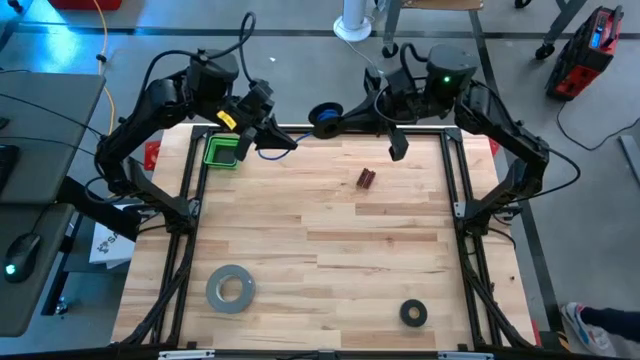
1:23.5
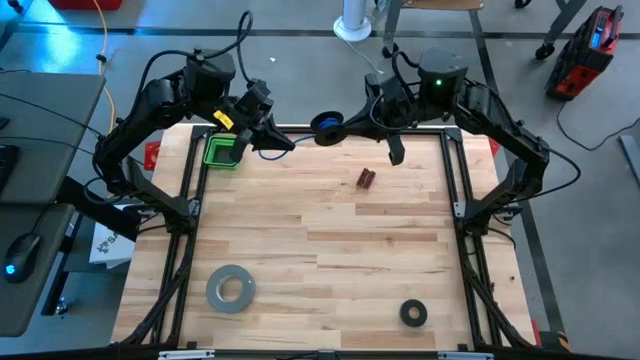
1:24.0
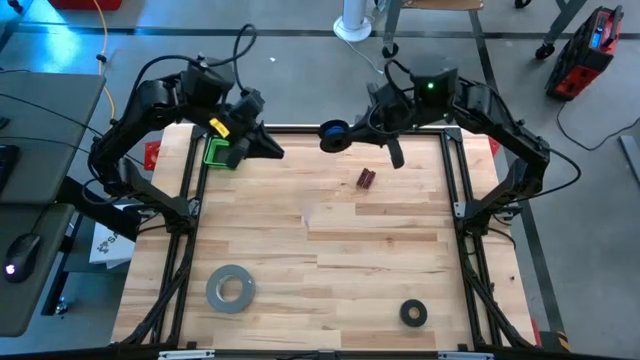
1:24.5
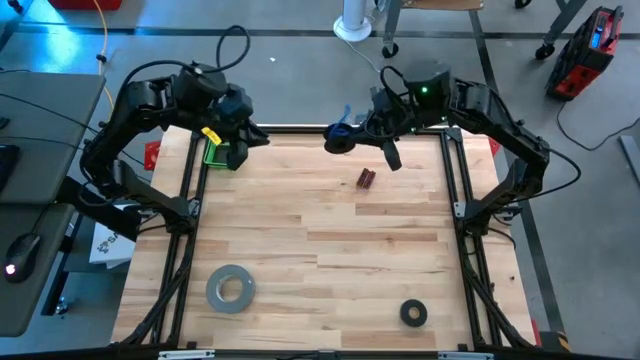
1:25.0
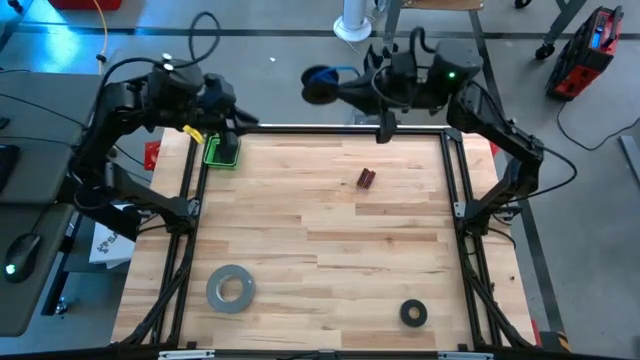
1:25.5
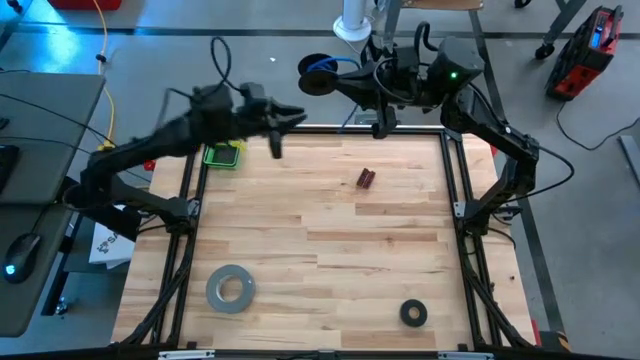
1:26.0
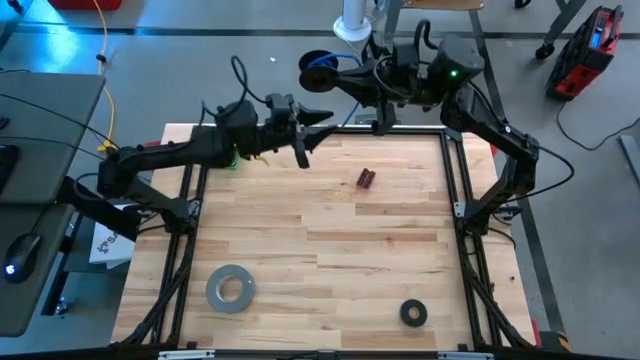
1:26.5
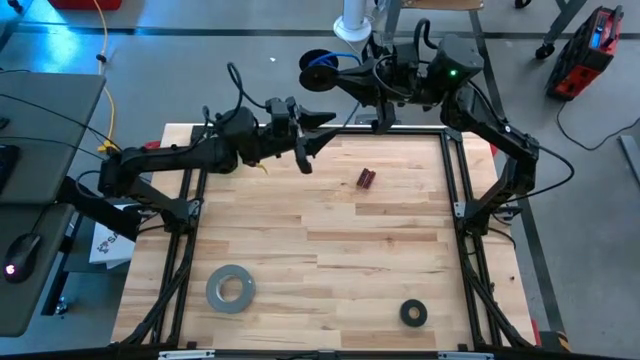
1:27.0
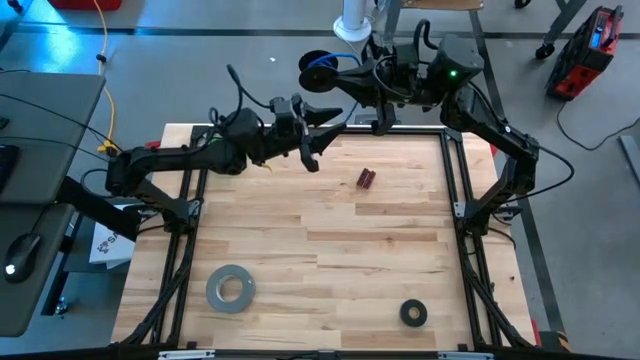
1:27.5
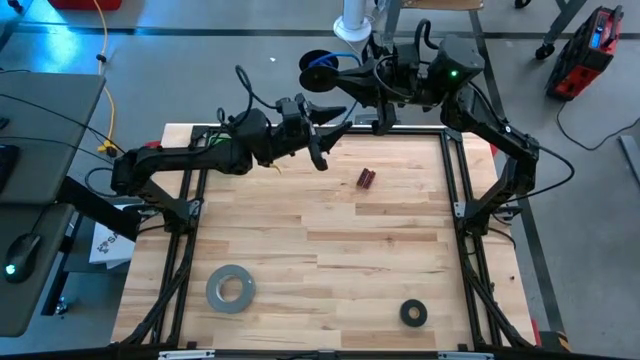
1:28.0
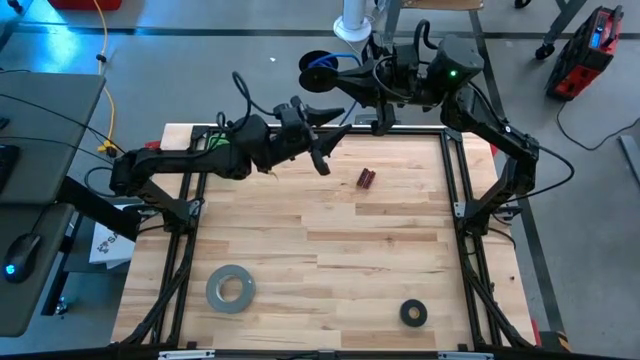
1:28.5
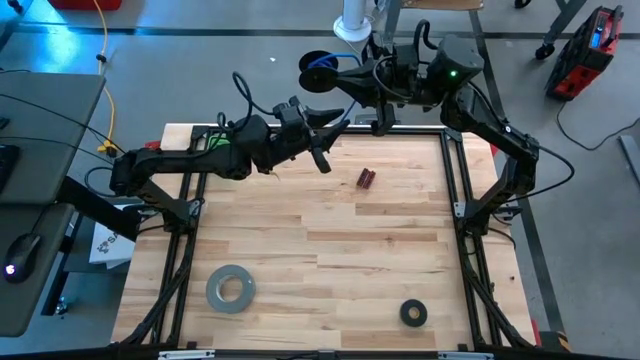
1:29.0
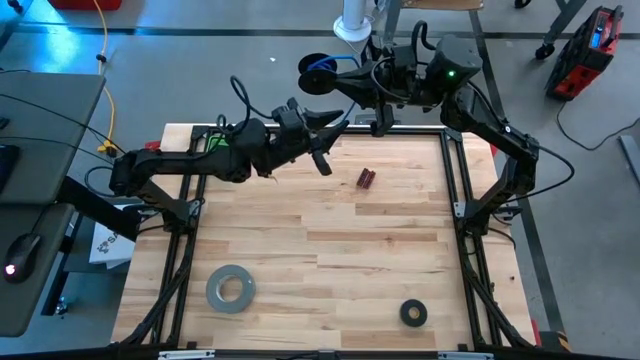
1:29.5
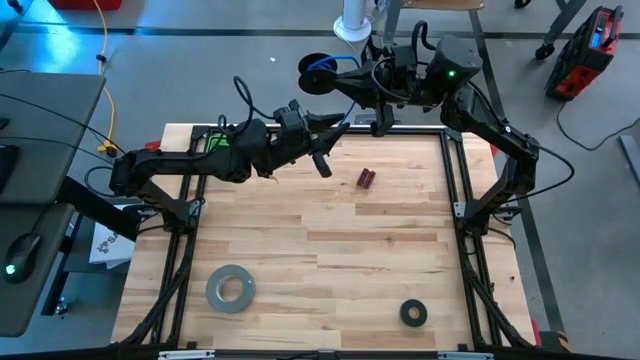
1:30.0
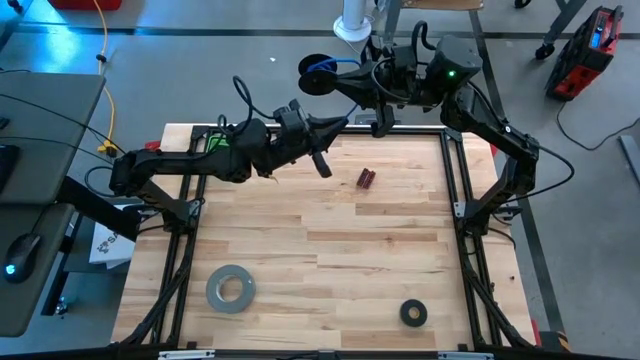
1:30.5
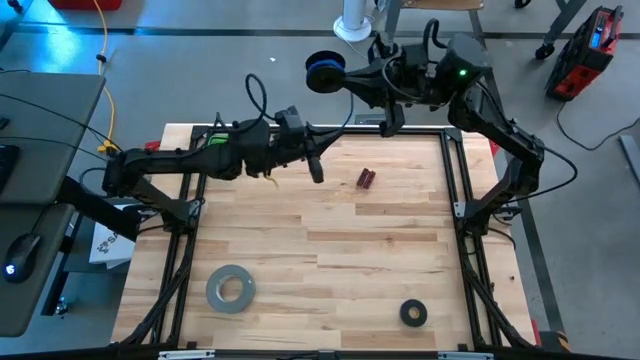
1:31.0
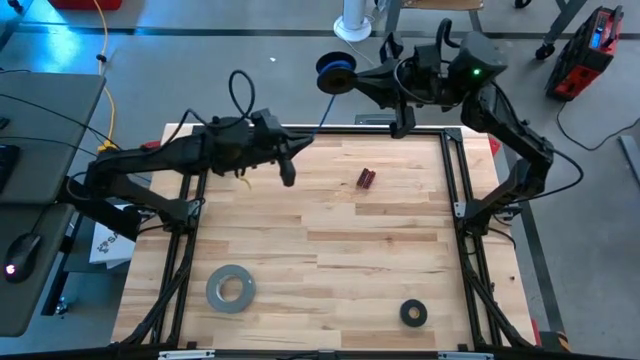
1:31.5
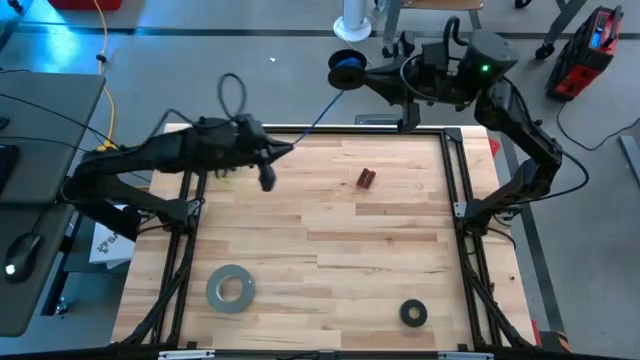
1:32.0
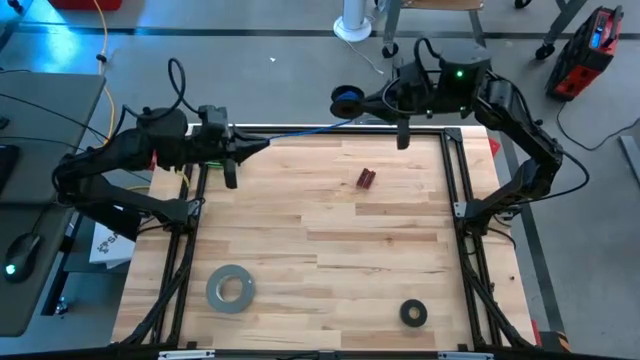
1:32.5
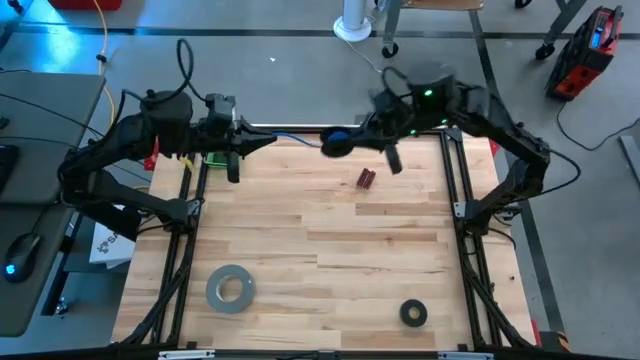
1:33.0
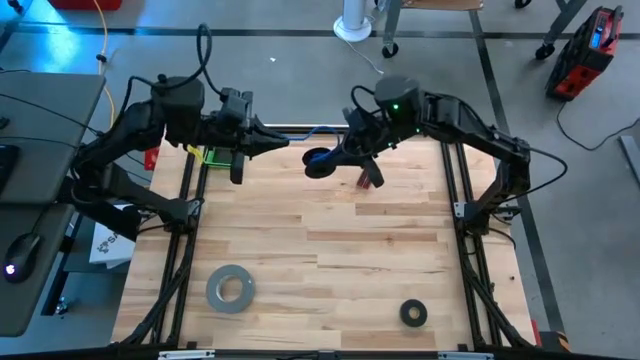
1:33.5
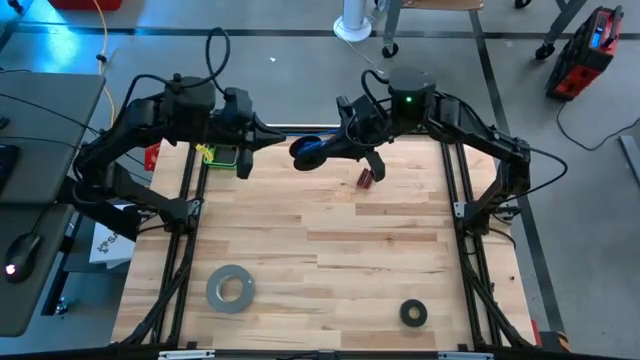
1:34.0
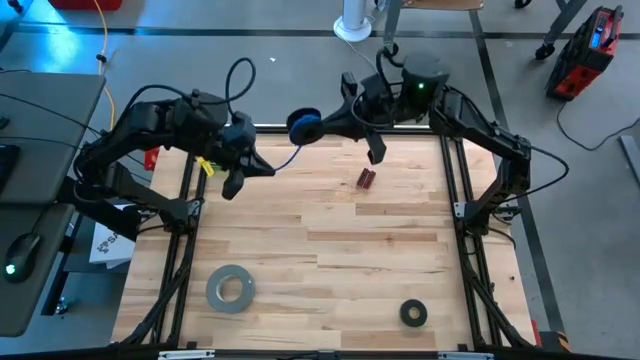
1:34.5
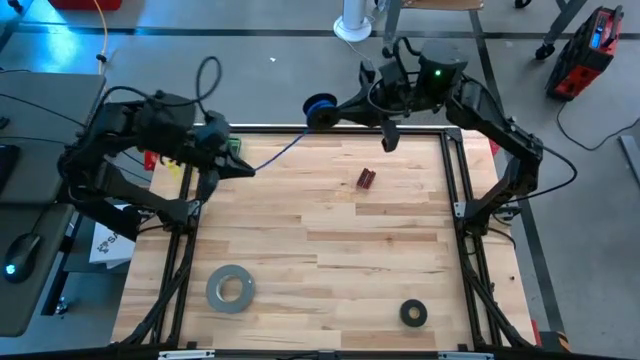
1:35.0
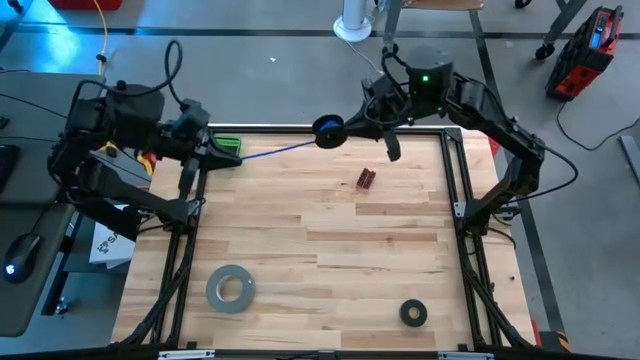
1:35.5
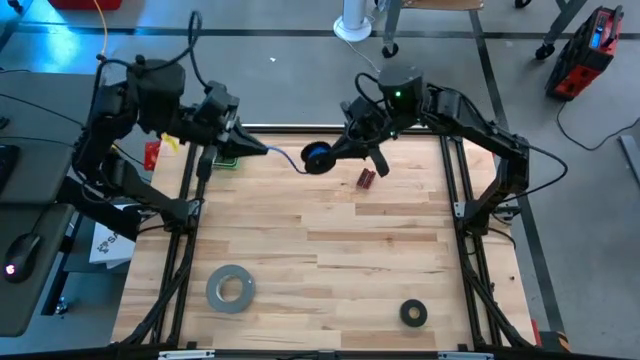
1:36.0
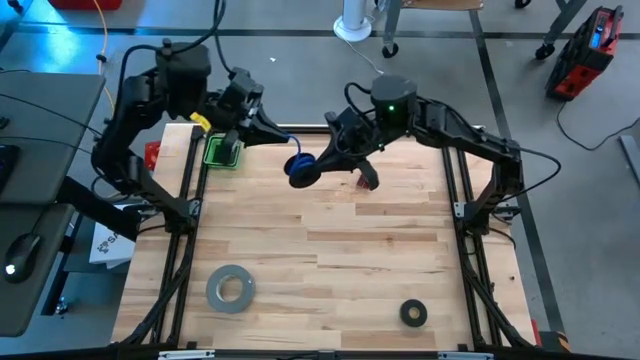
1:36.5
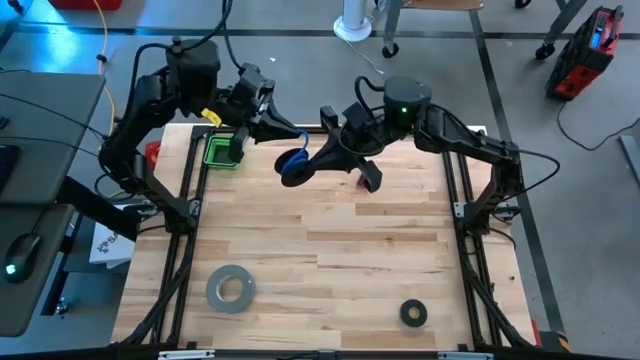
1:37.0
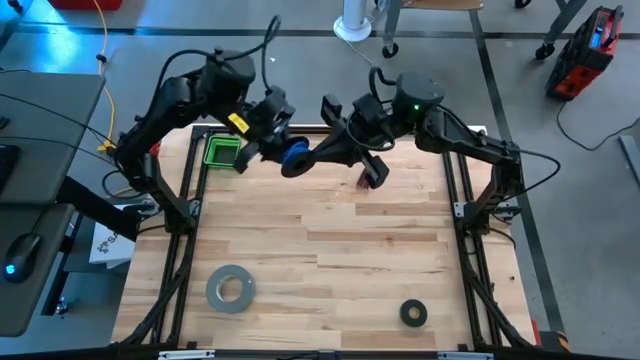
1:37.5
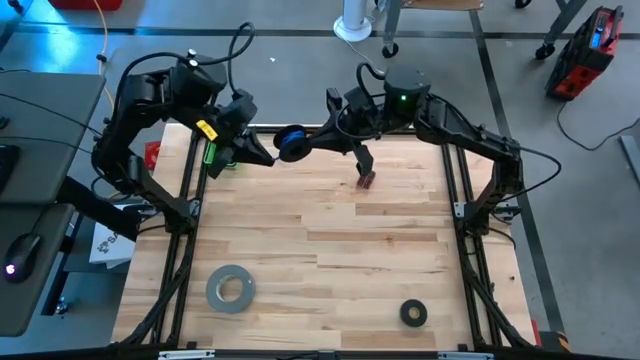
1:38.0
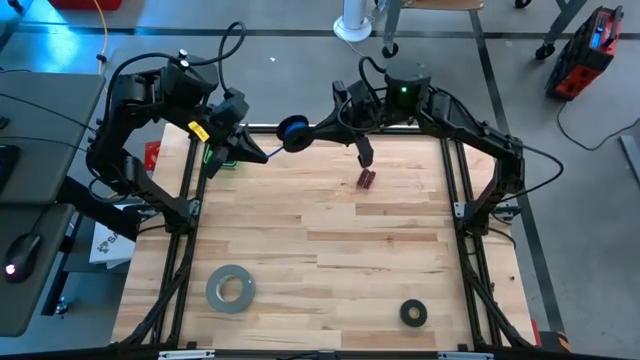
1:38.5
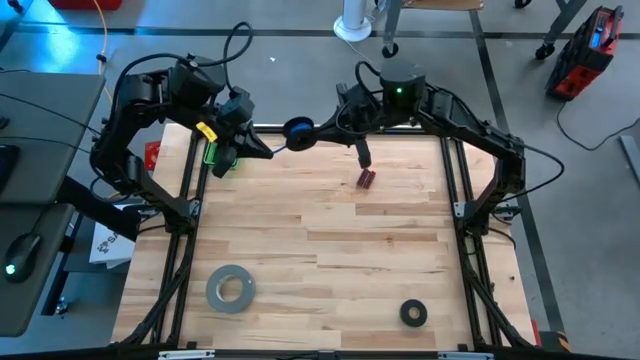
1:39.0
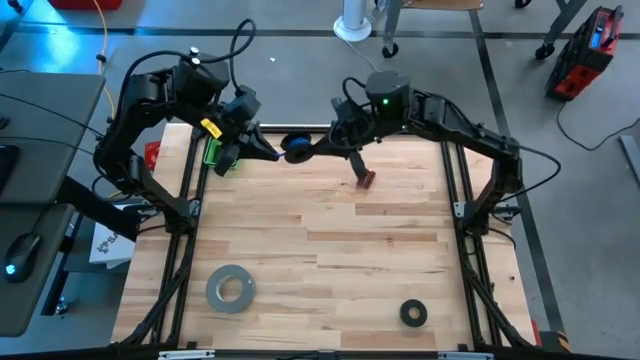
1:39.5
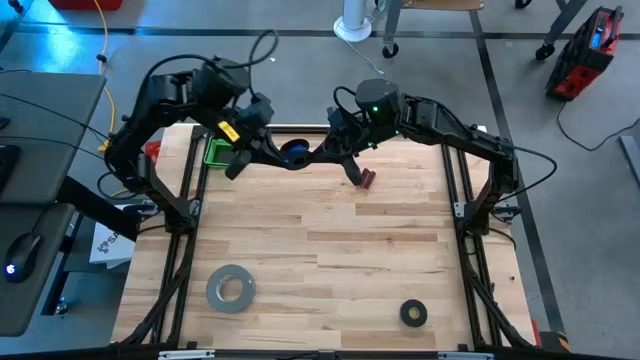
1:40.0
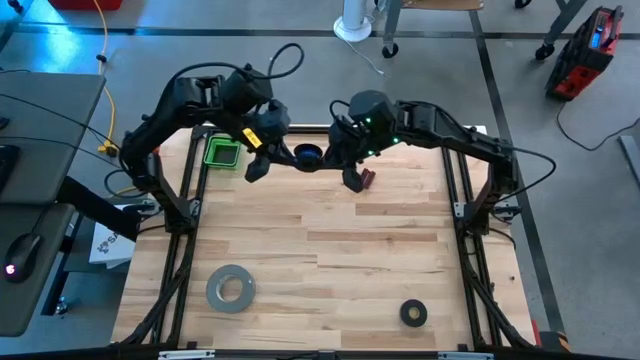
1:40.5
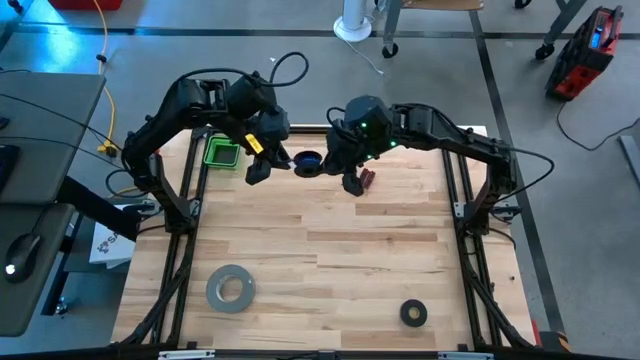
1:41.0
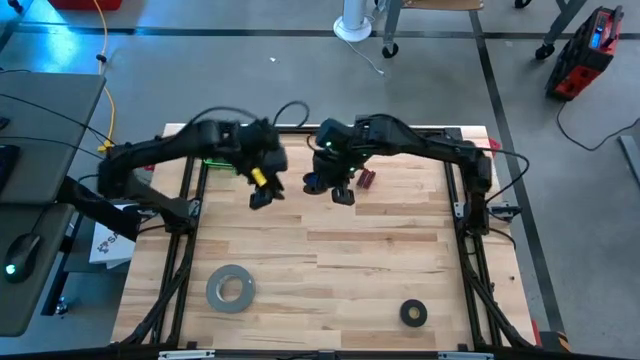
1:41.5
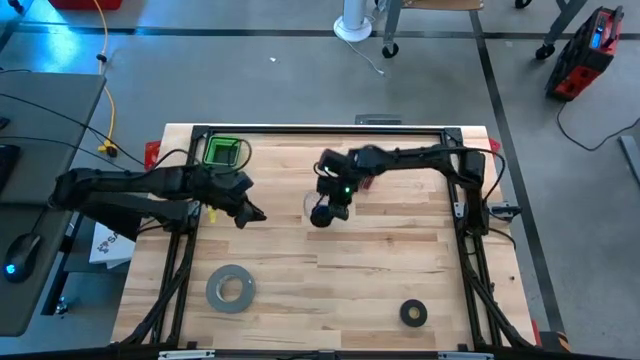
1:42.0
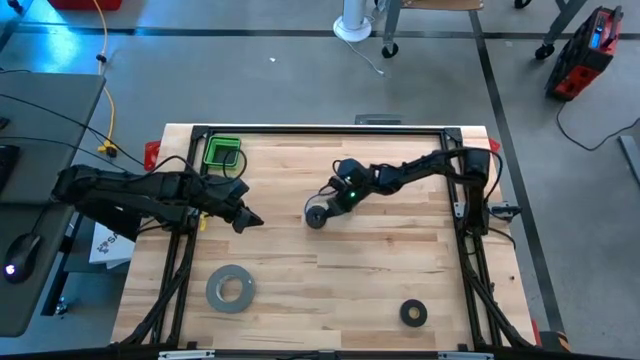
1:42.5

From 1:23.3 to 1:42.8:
Task: Coil cords
Coil the blue wire onto a spool
